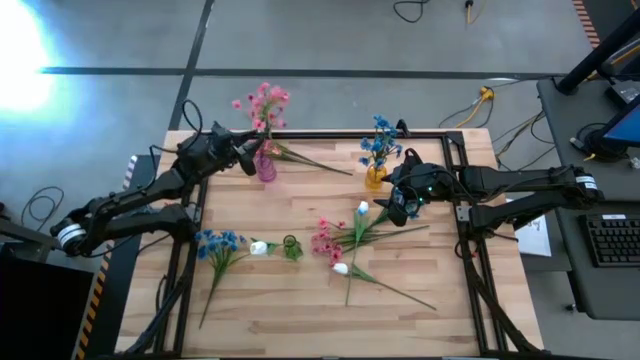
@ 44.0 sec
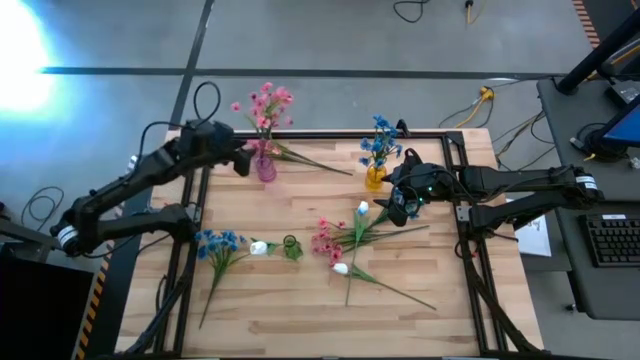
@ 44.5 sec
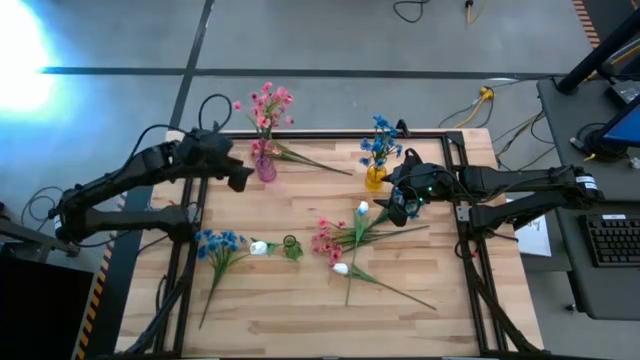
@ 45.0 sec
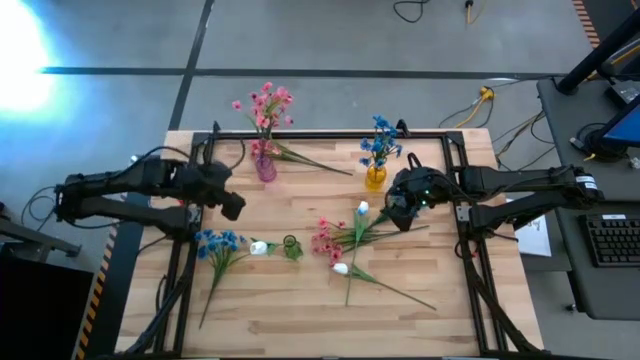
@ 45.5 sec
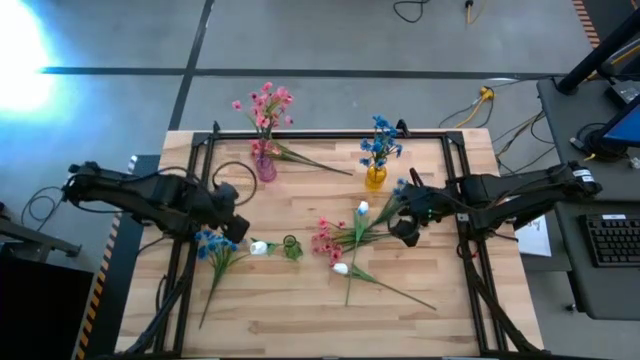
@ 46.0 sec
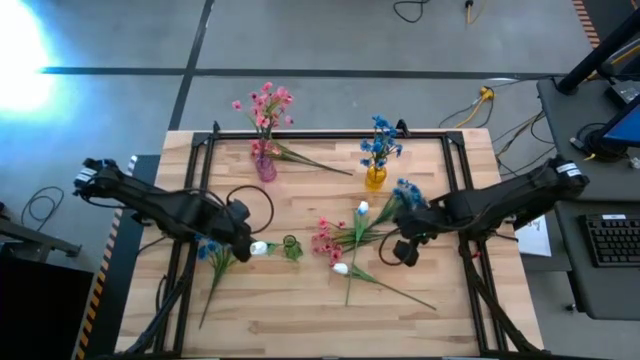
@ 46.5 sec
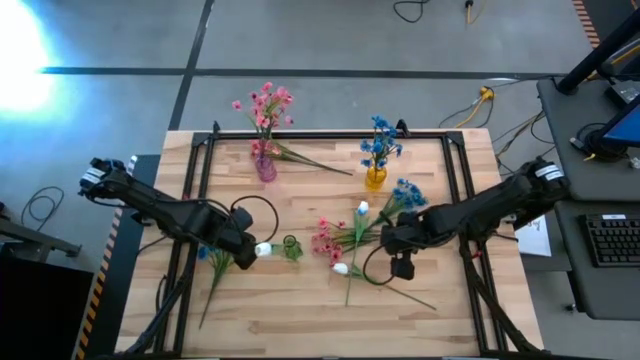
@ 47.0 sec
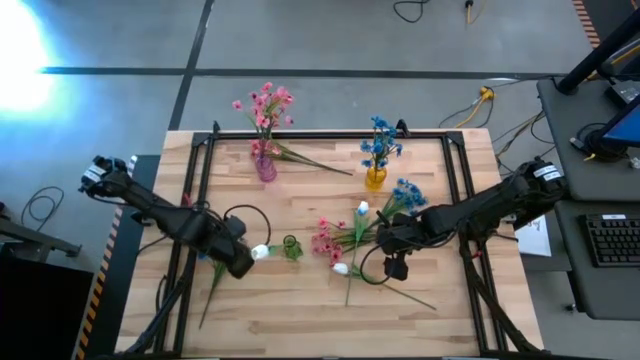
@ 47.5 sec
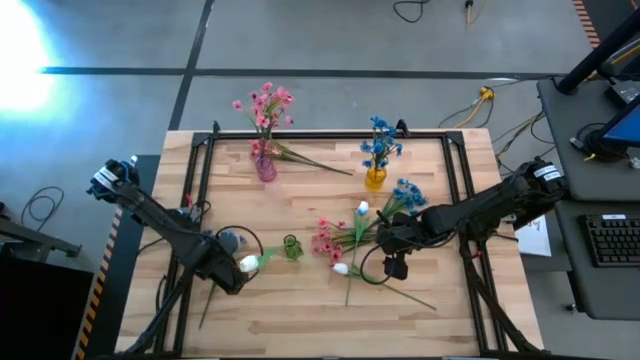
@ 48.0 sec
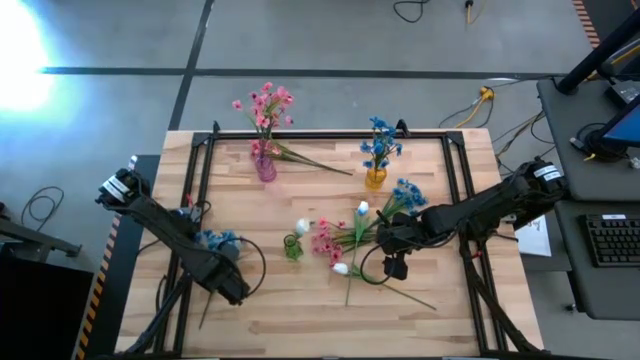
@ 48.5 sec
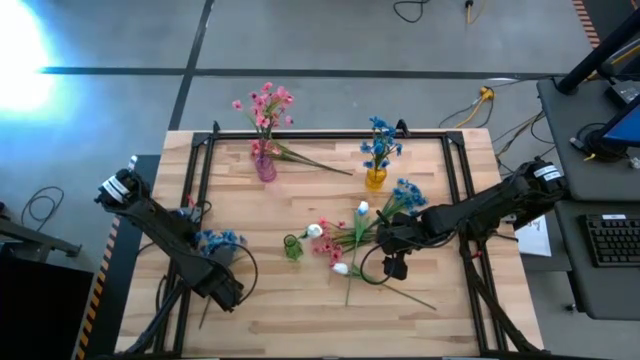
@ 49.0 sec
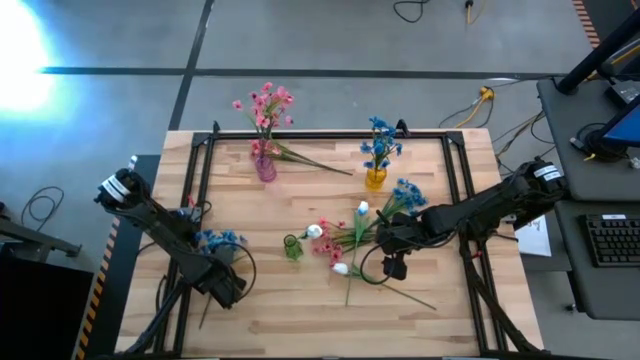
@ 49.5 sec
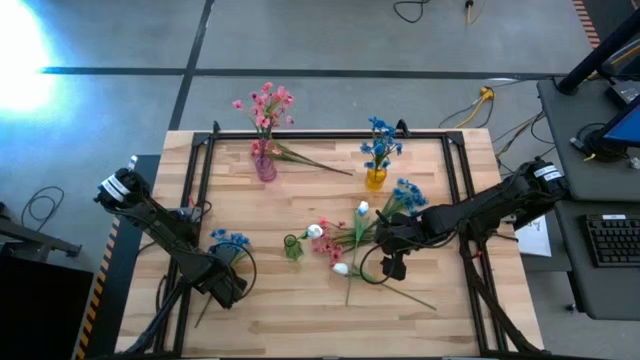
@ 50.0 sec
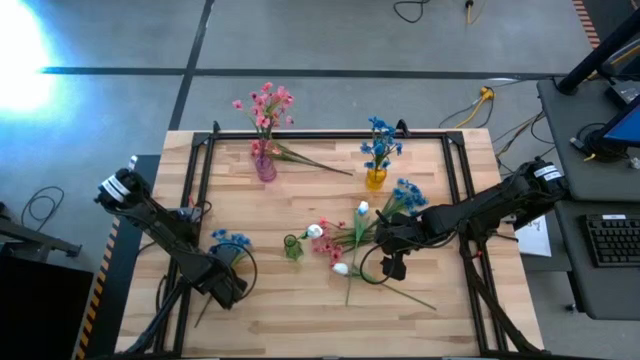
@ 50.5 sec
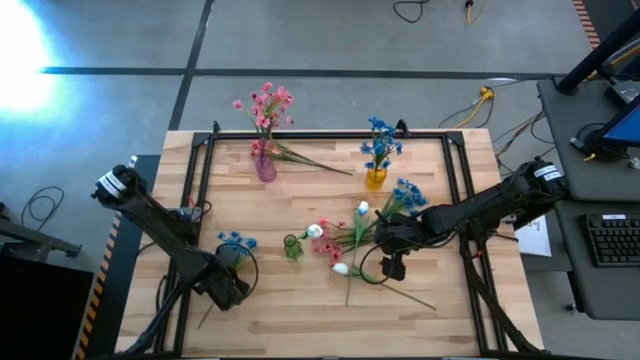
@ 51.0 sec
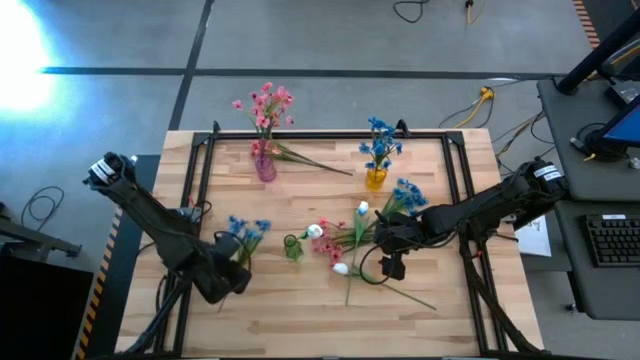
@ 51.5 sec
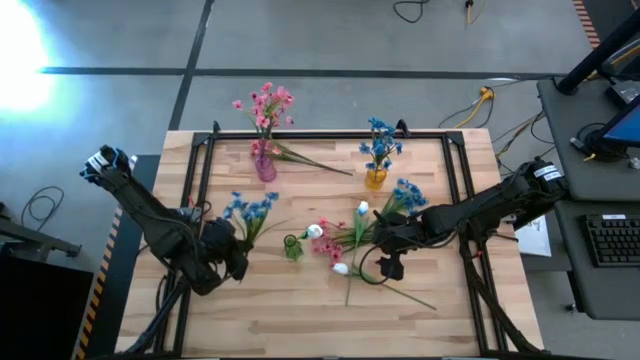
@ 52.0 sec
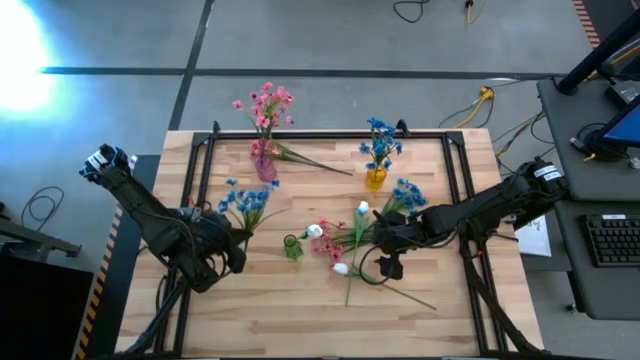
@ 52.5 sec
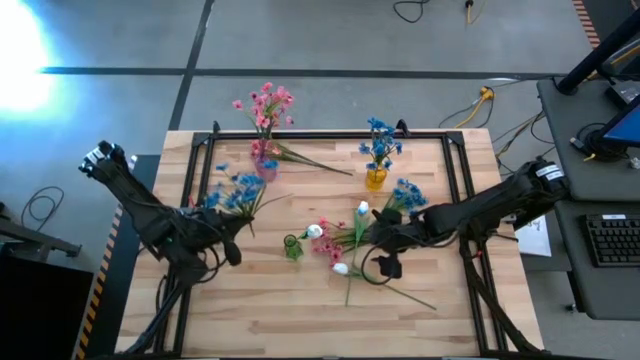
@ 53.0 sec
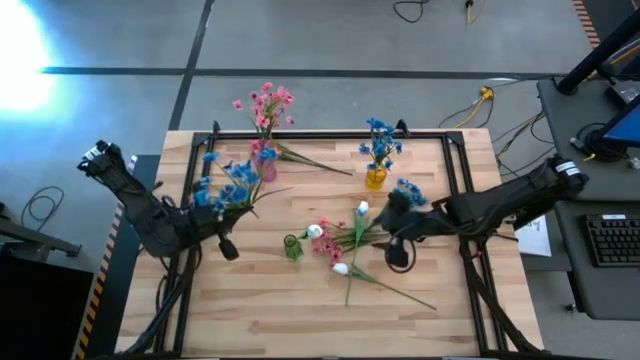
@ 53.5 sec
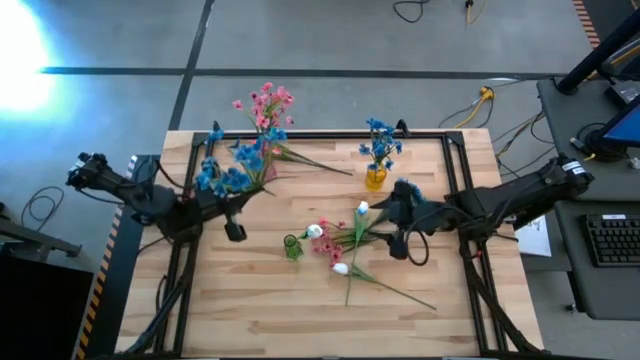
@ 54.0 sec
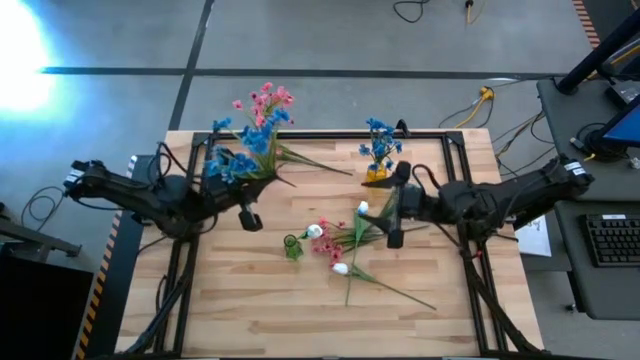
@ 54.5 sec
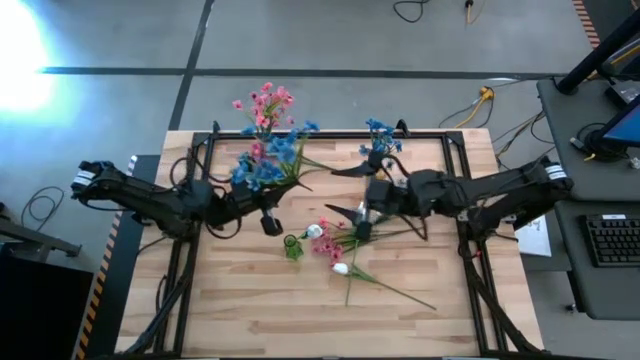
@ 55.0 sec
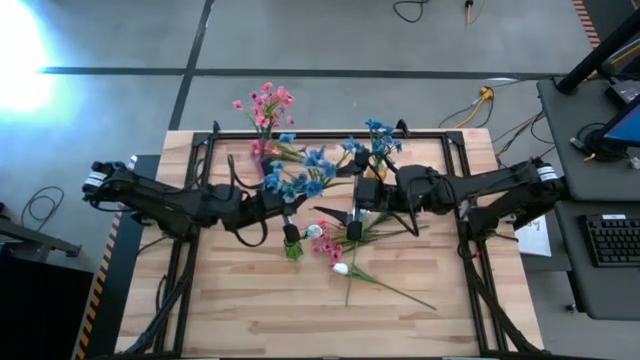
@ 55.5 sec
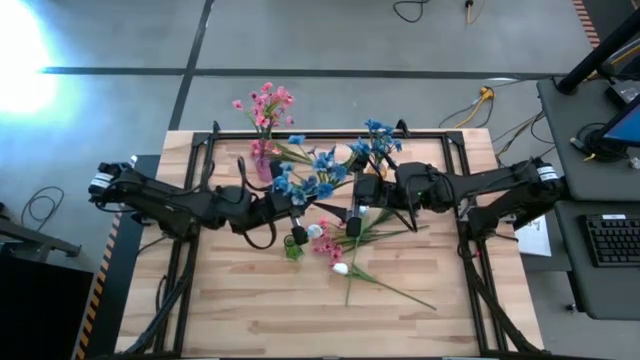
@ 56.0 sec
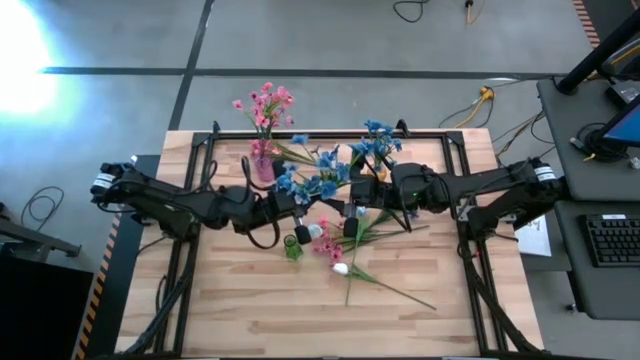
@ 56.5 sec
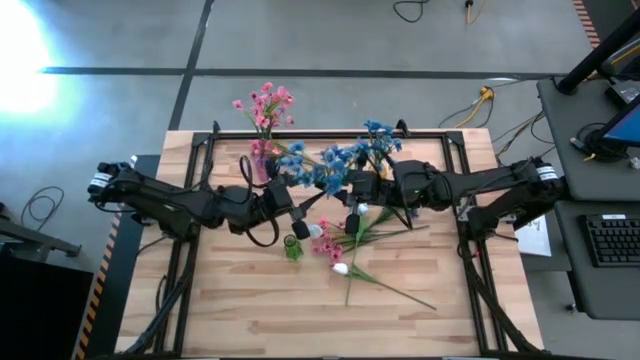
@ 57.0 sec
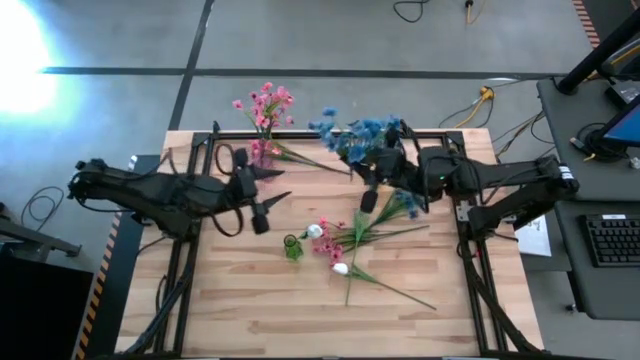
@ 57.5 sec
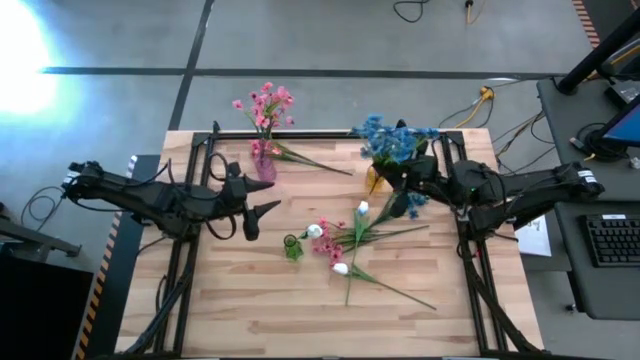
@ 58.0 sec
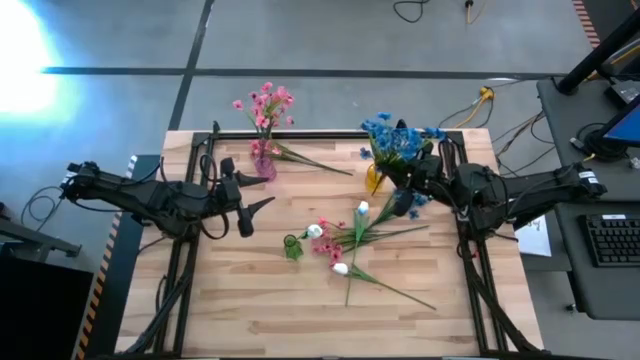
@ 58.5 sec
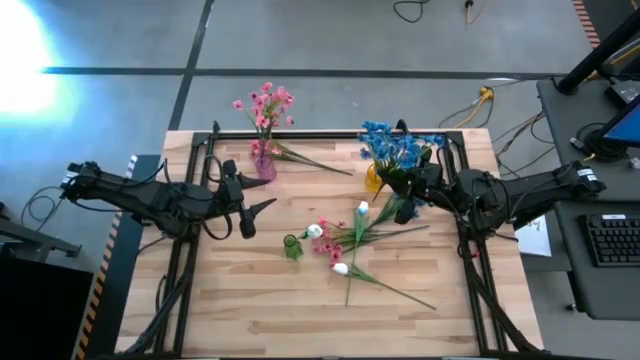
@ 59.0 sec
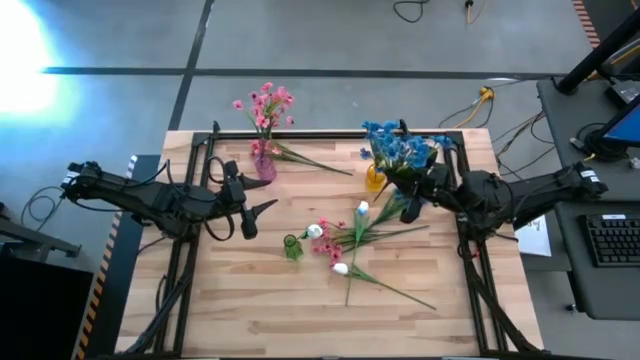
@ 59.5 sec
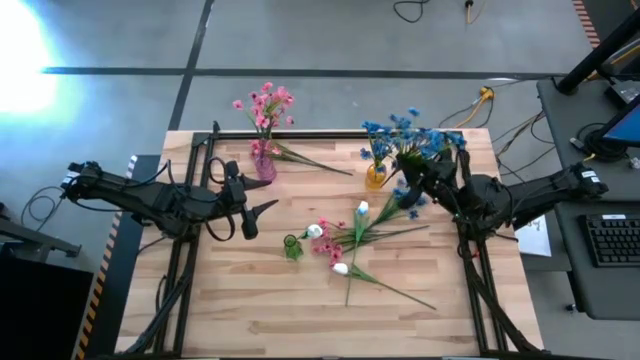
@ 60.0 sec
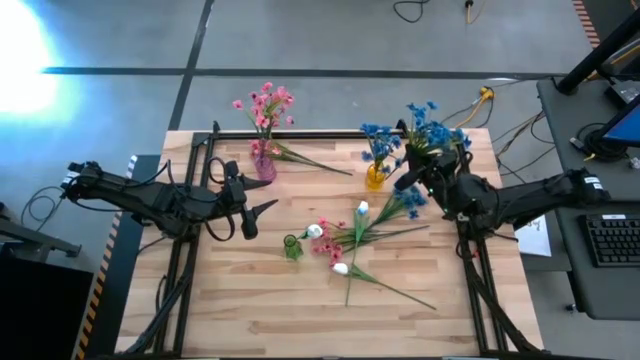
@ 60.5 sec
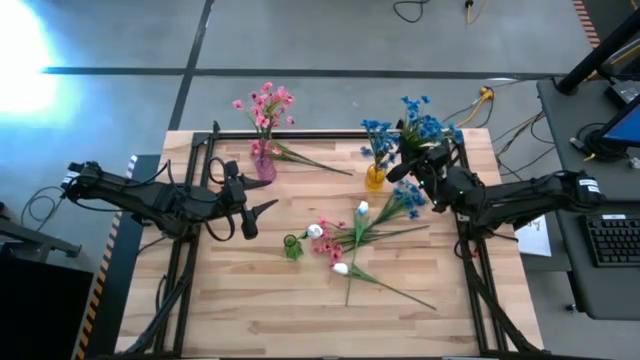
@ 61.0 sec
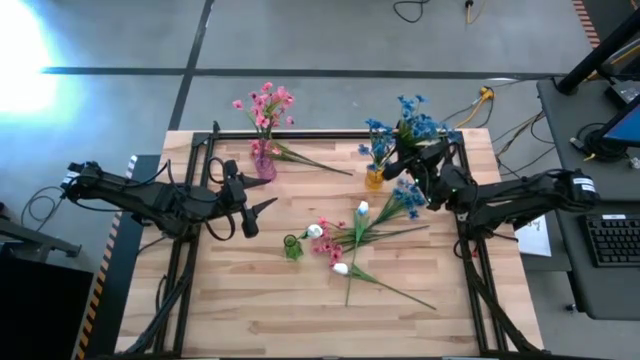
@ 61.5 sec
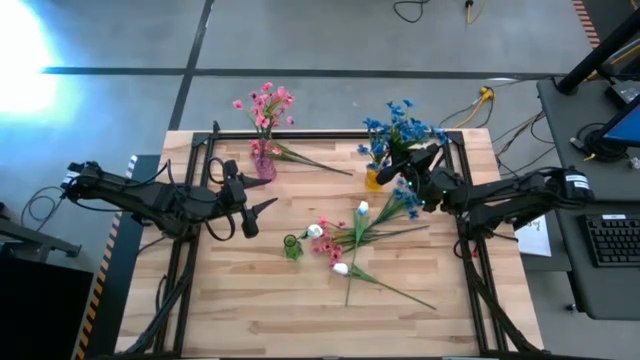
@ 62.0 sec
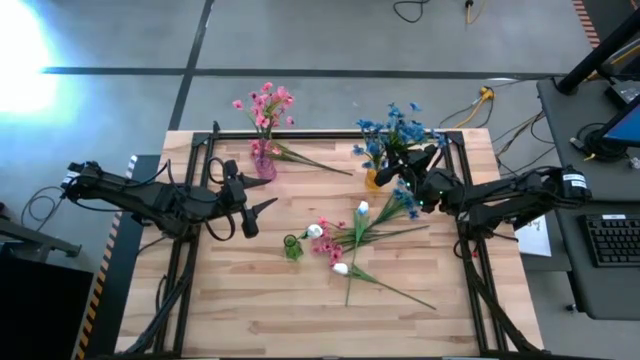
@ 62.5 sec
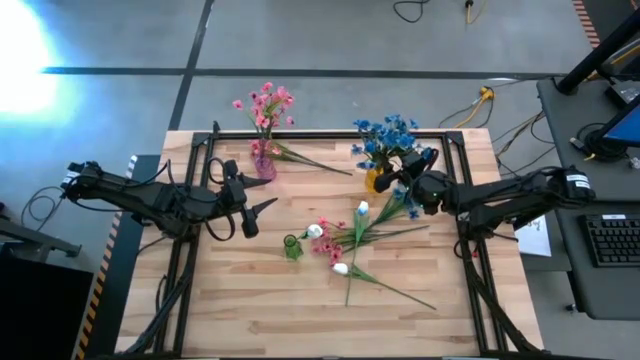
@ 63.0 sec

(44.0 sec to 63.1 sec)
Task: Sort flowers into vase by color
Put the left blue flowers into the yellow vase
